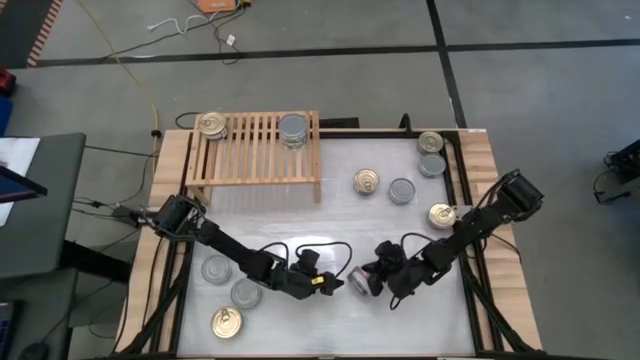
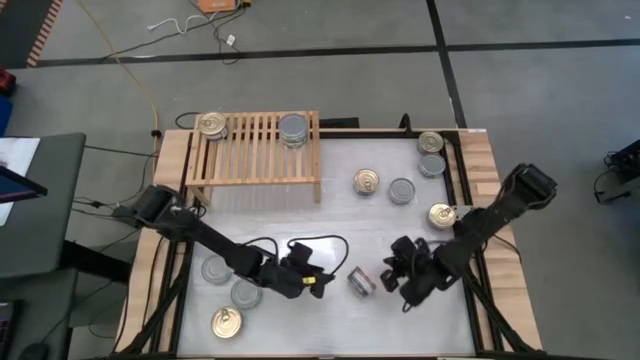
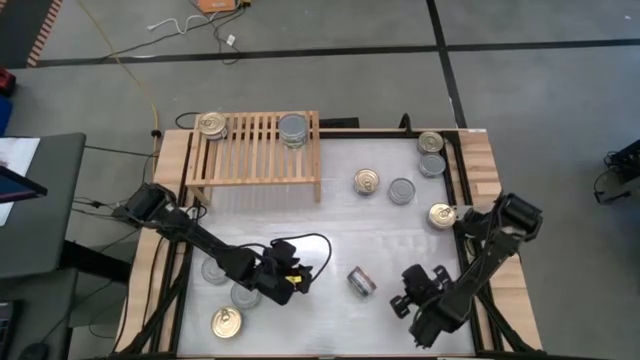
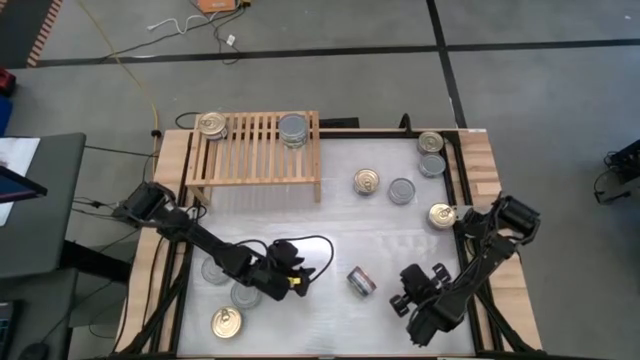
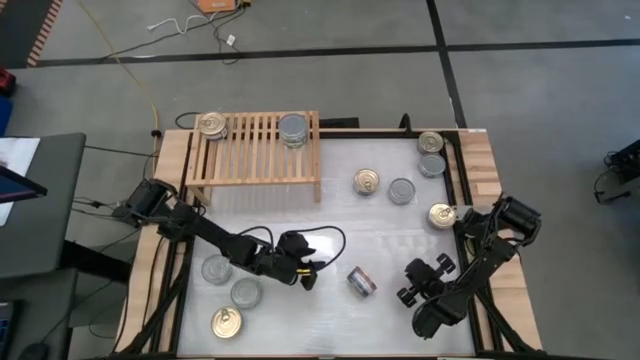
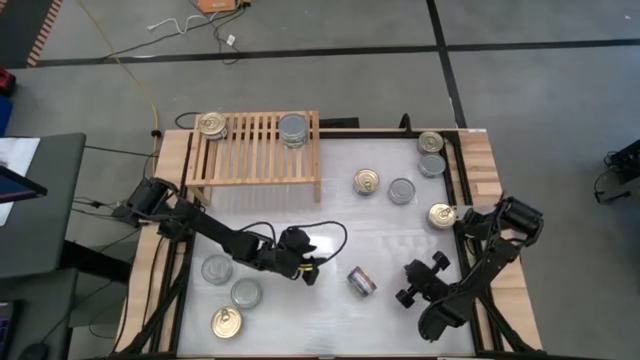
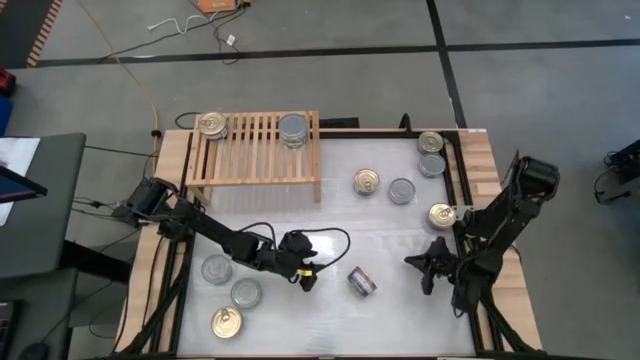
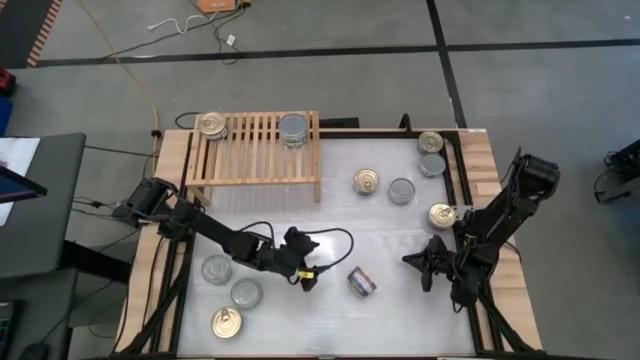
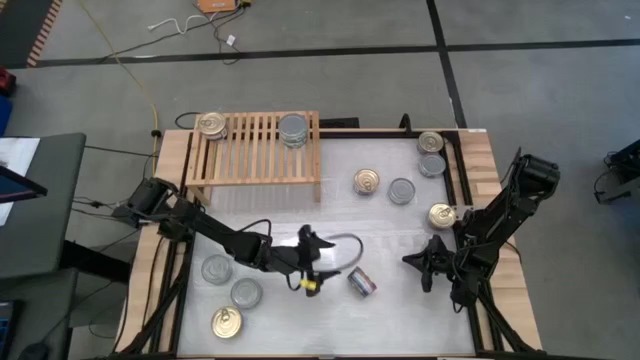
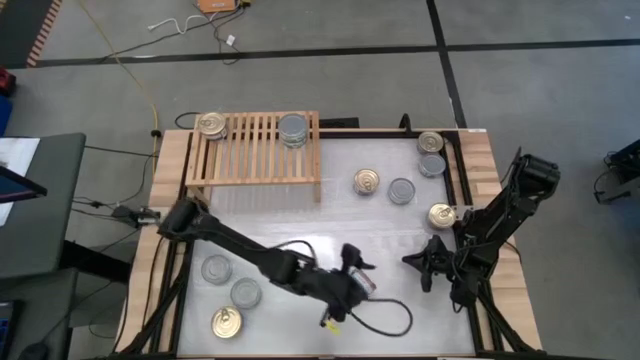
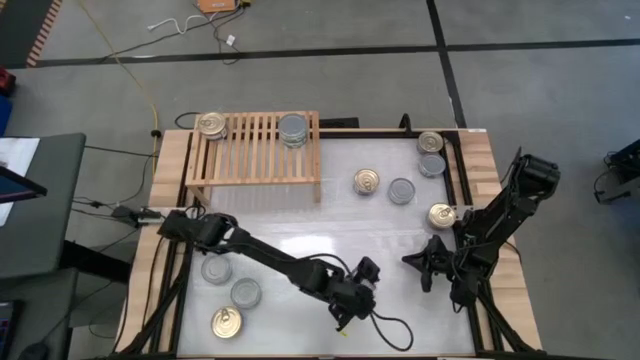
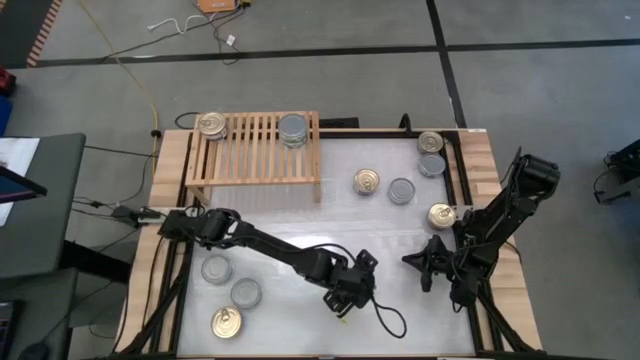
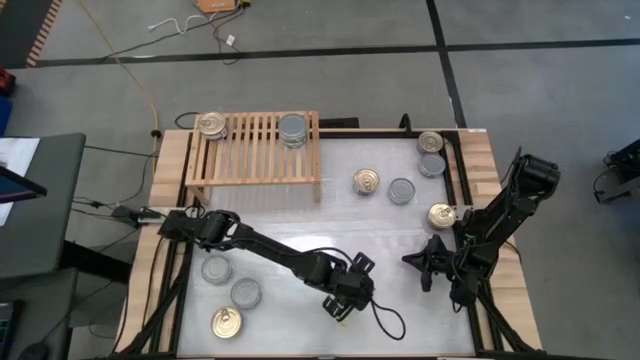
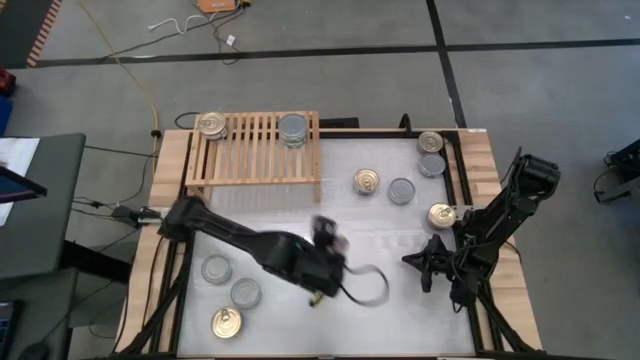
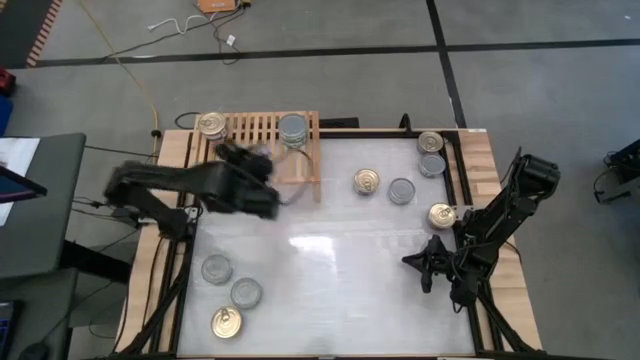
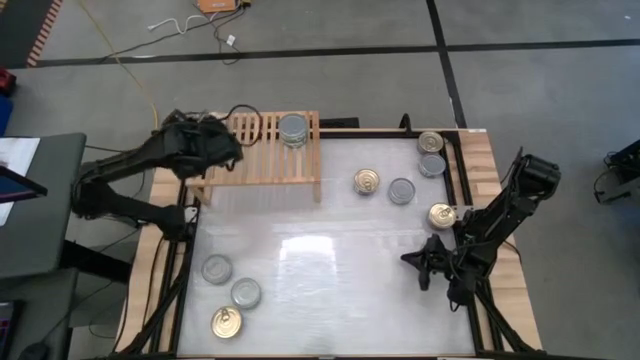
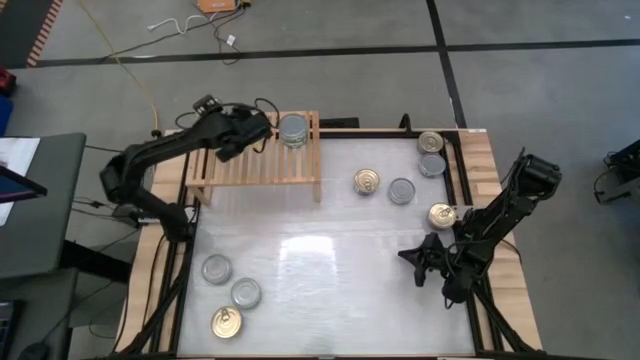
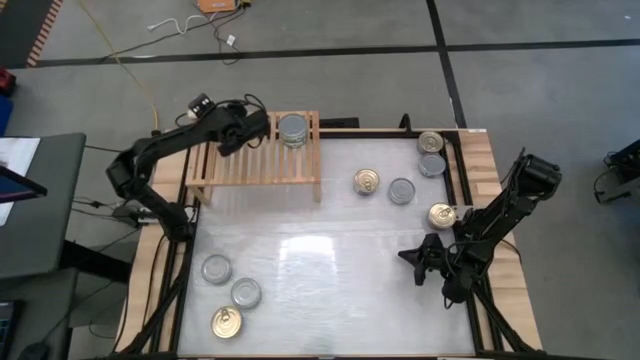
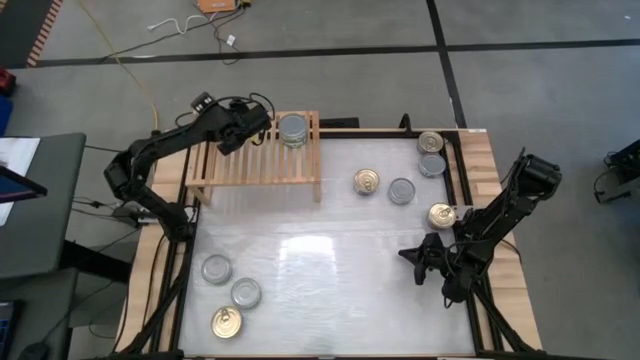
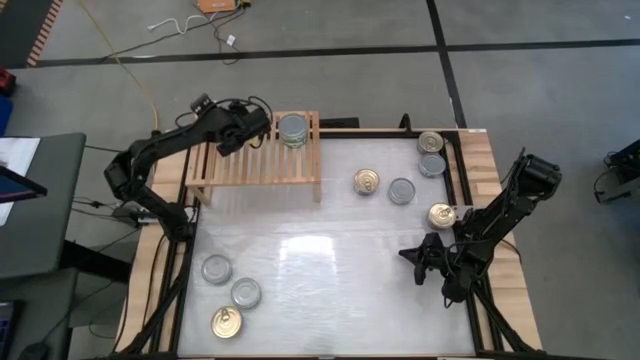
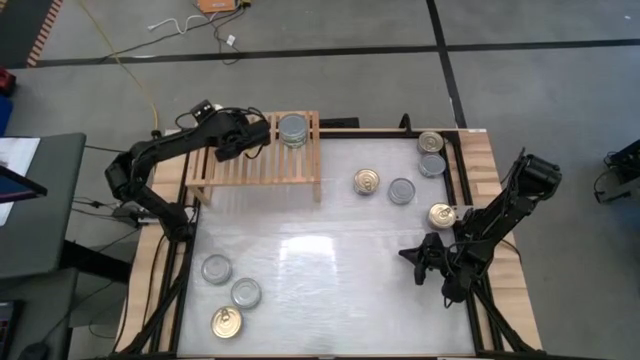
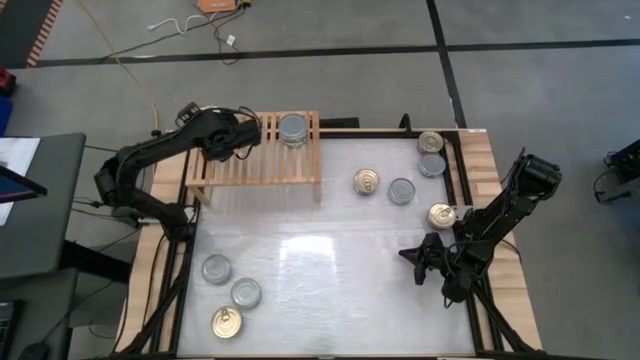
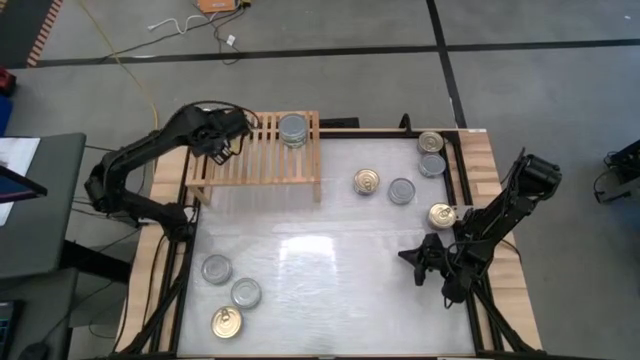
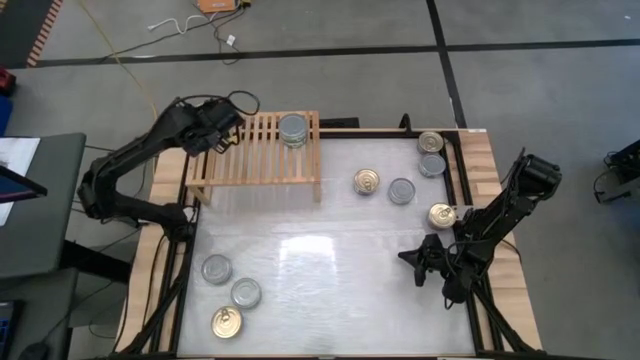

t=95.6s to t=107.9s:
Task: Stack canned seafood by type on shelf
Stack the blue tuna can on top of the blue tuna can on the shelf

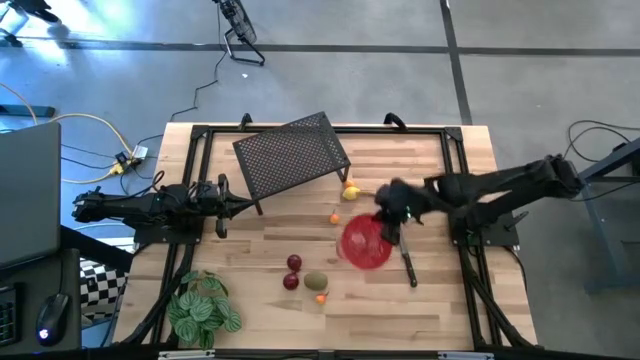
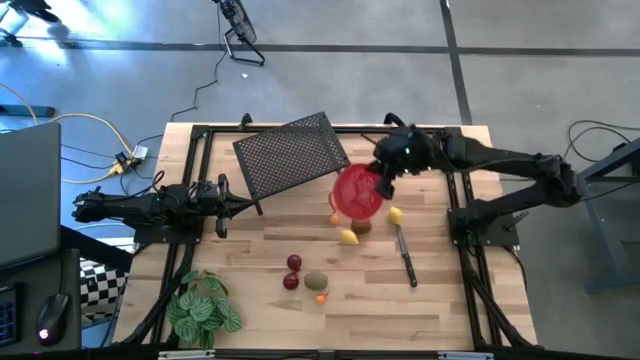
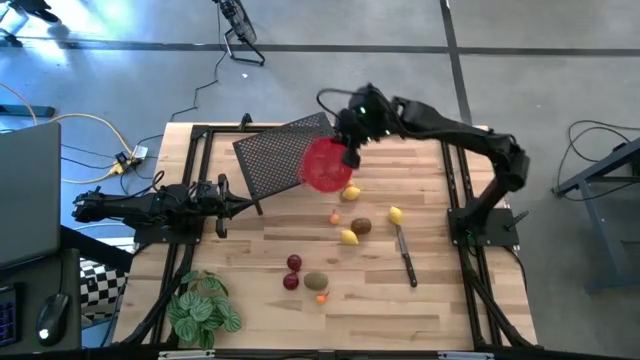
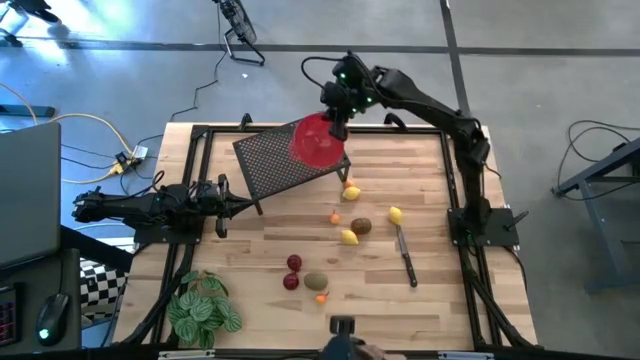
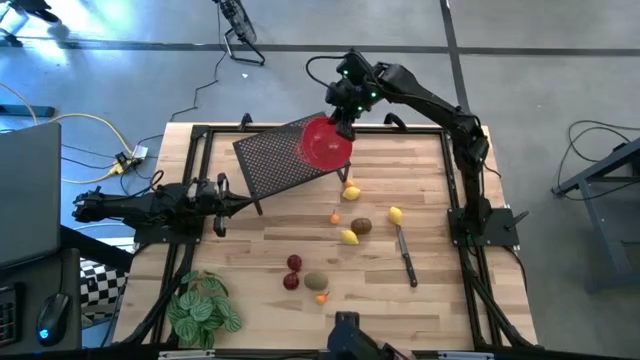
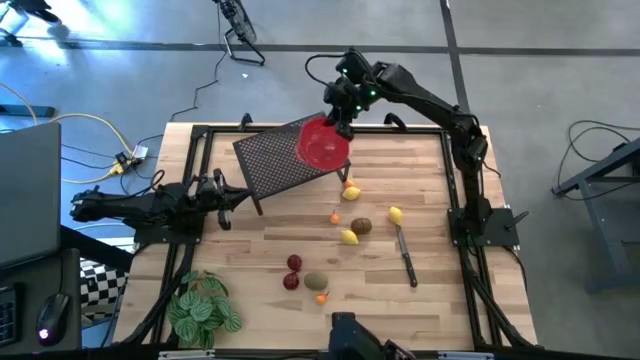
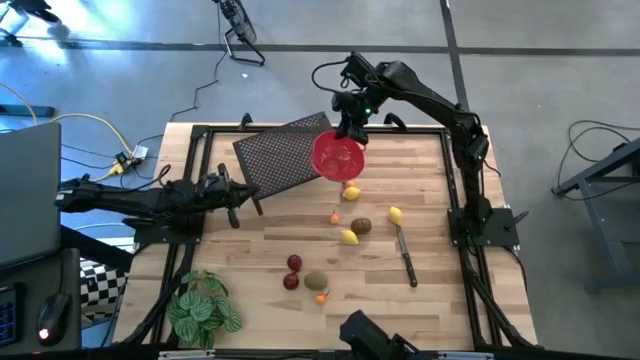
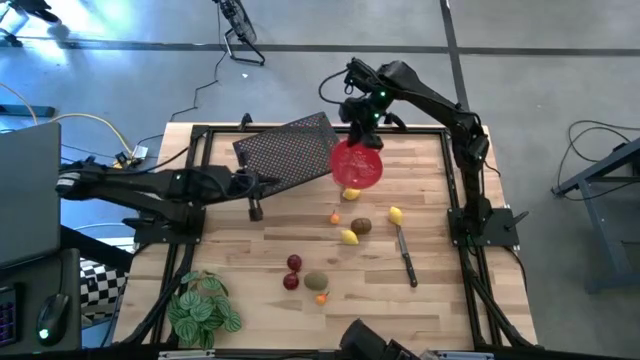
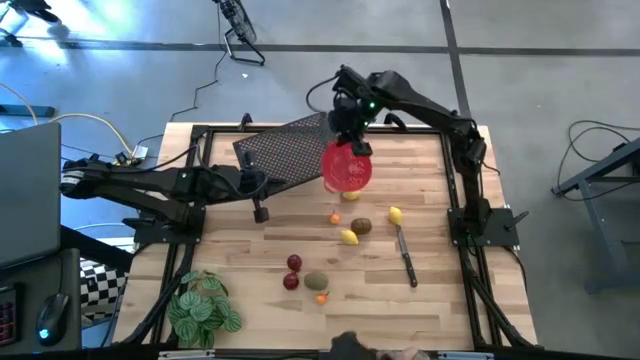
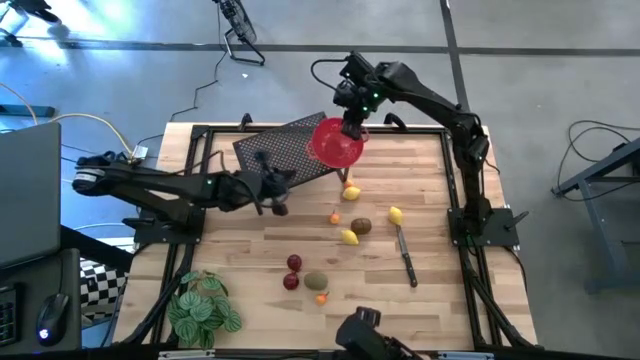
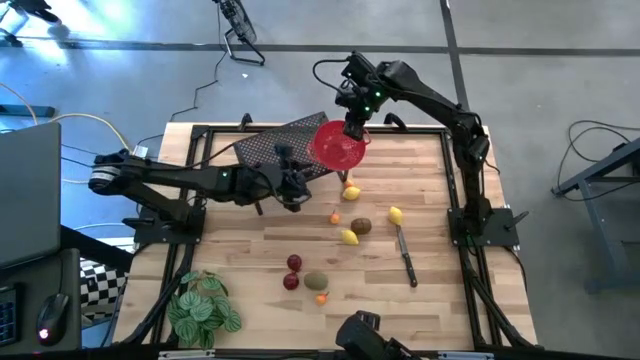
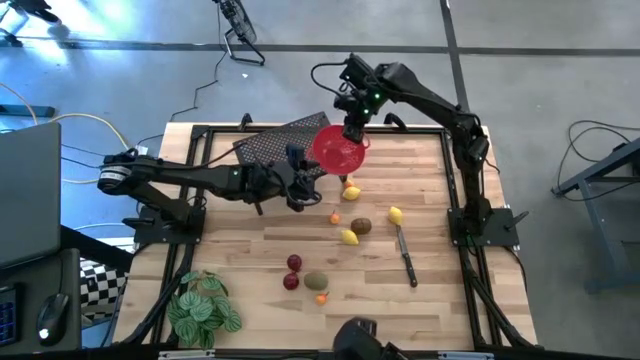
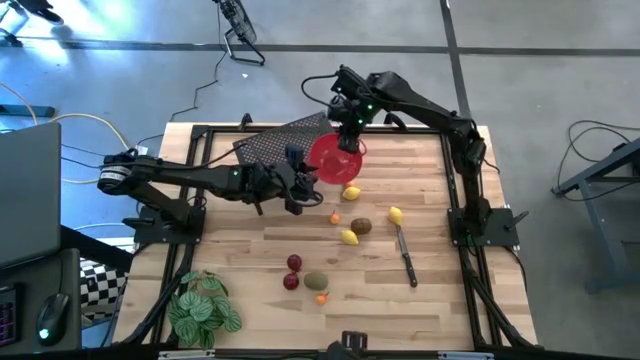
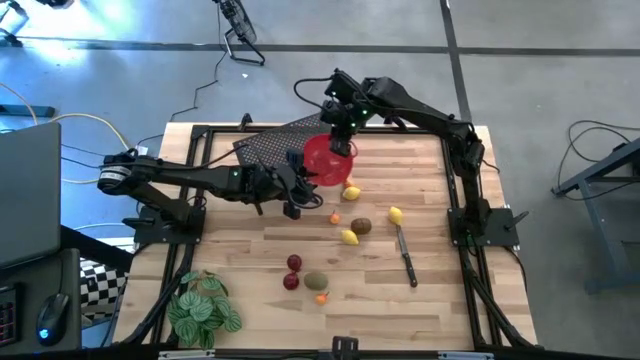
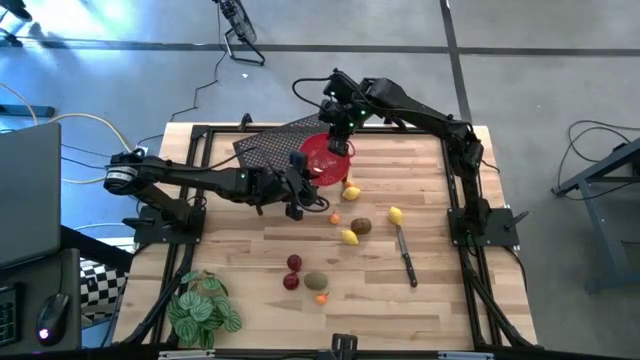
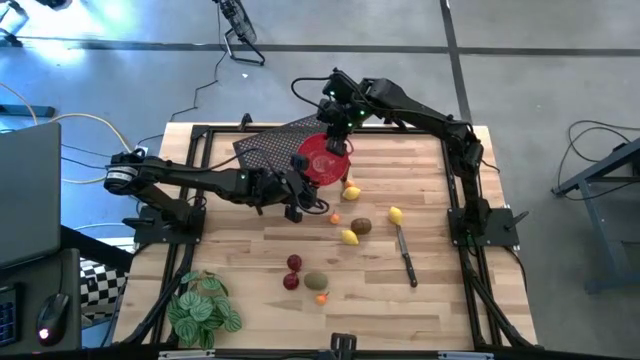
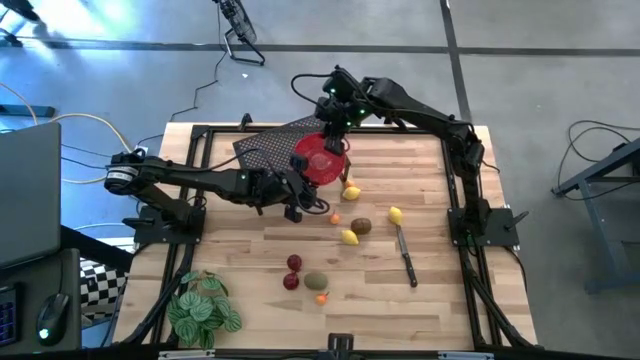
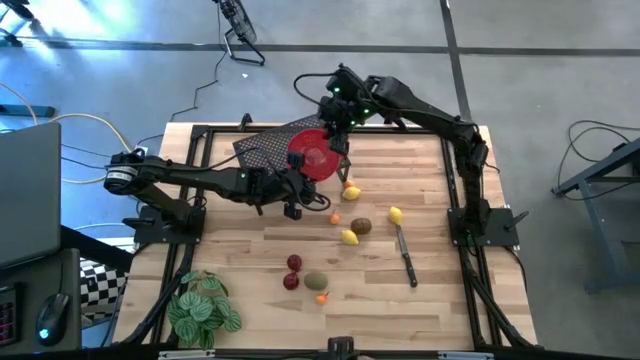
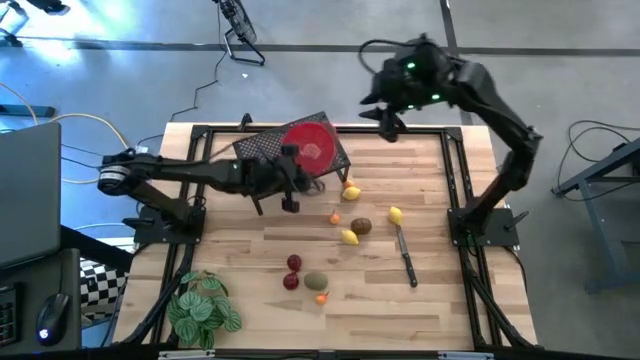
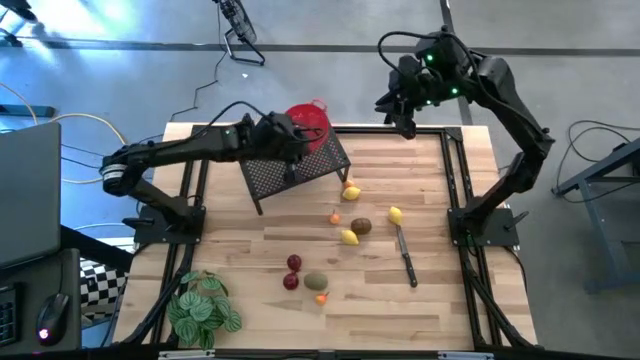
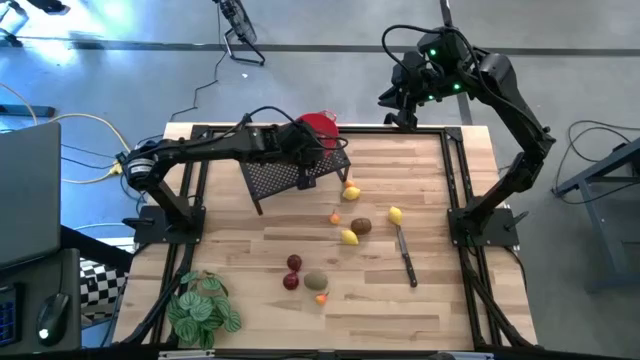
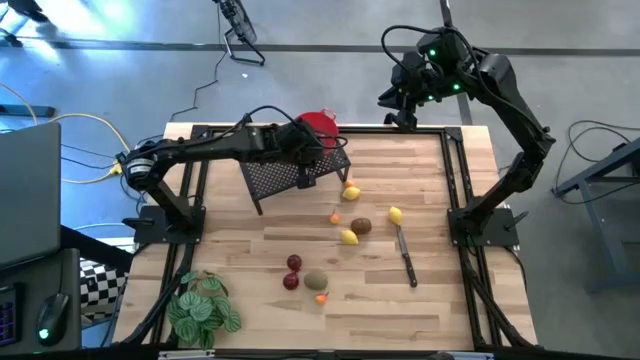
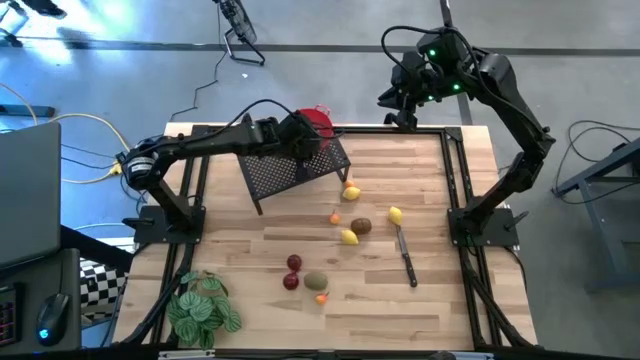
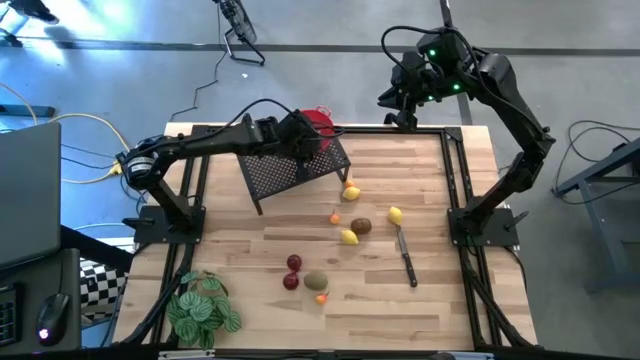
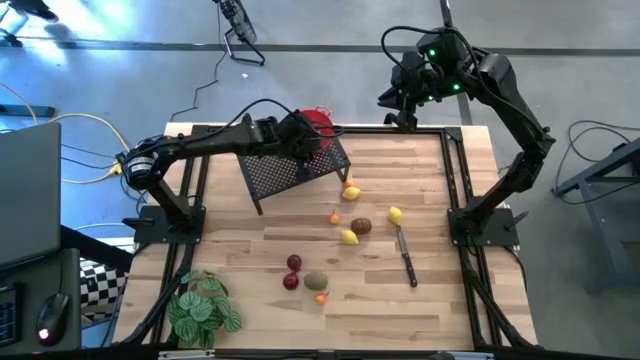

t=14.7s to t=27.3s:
Task: Pick & Place Fruit
Put the red strainer bowl on the shelf
